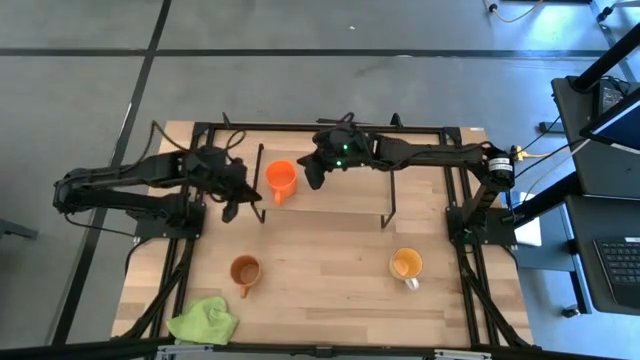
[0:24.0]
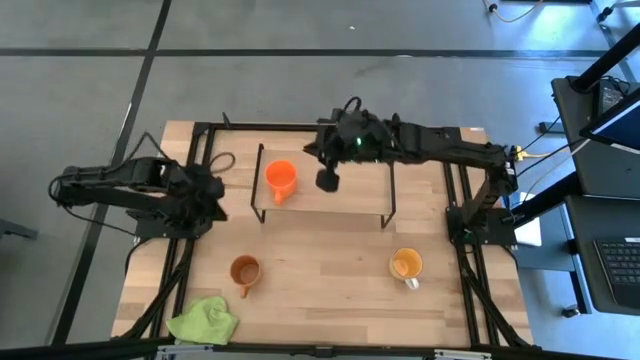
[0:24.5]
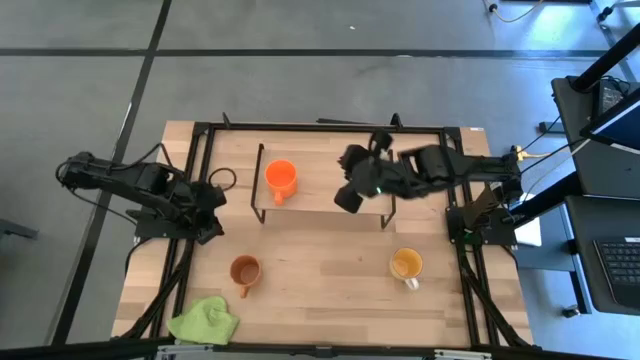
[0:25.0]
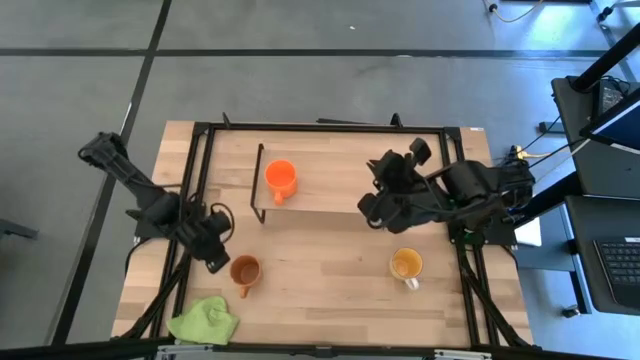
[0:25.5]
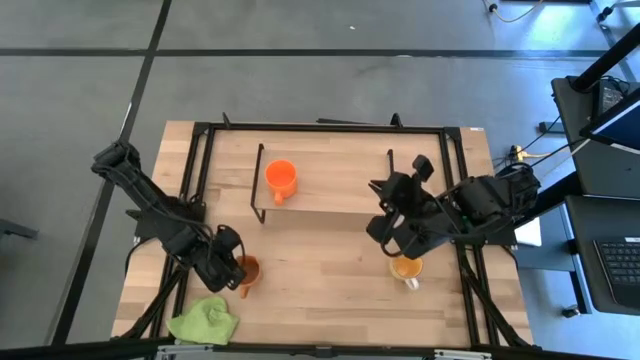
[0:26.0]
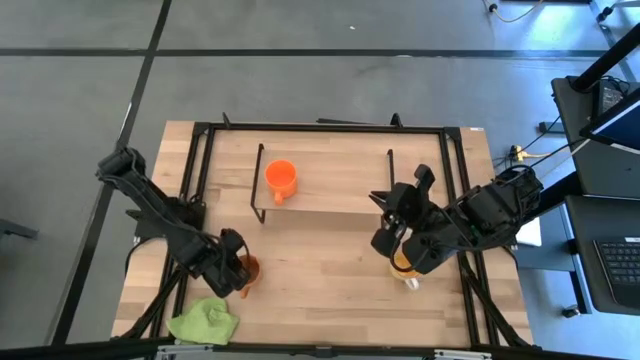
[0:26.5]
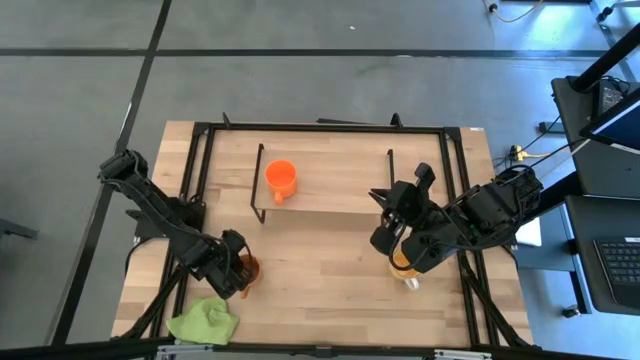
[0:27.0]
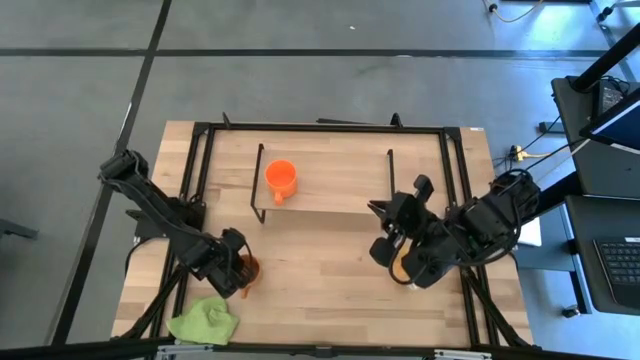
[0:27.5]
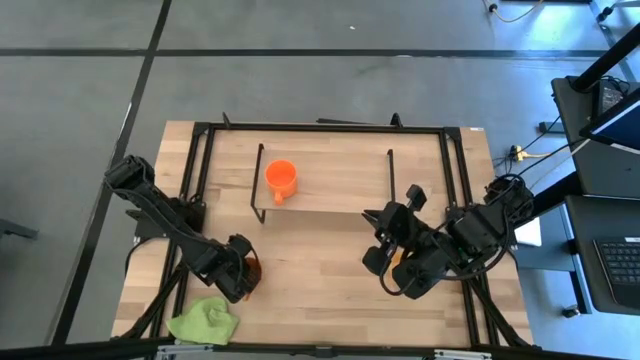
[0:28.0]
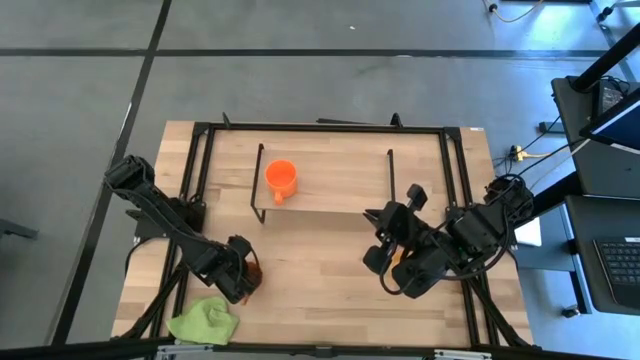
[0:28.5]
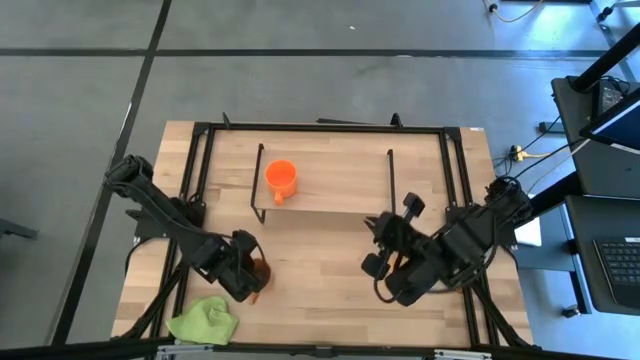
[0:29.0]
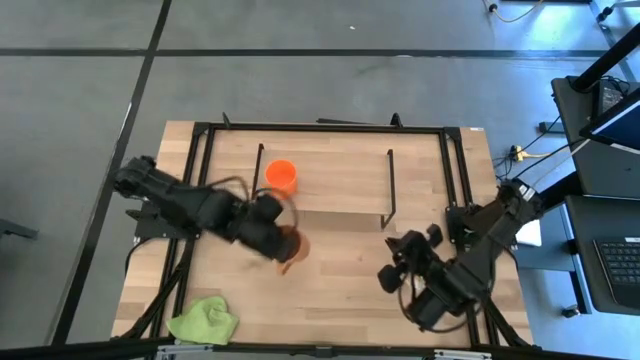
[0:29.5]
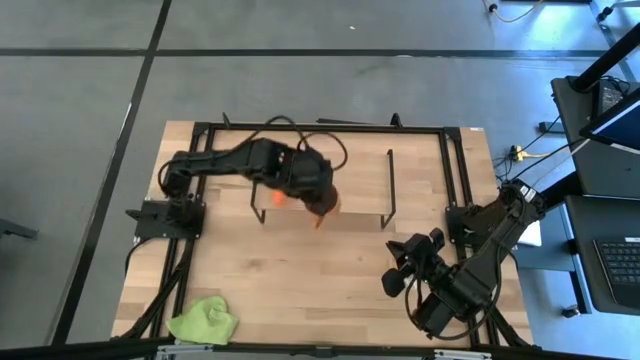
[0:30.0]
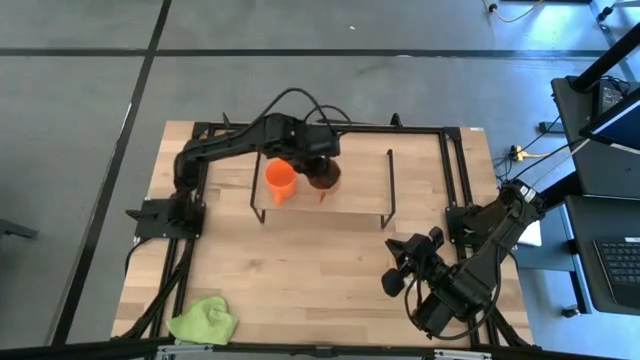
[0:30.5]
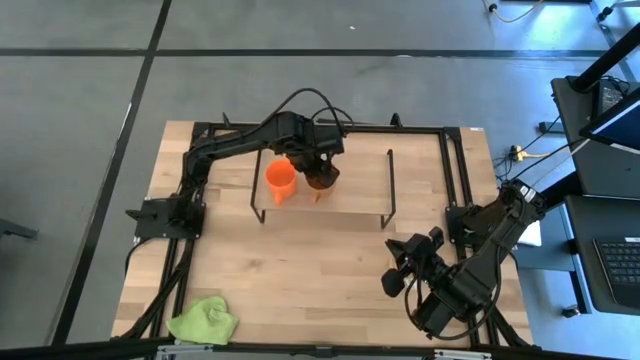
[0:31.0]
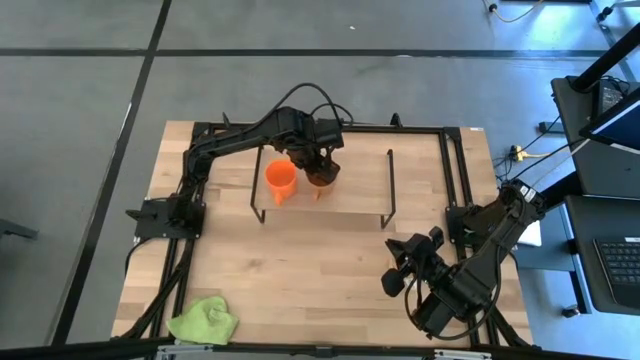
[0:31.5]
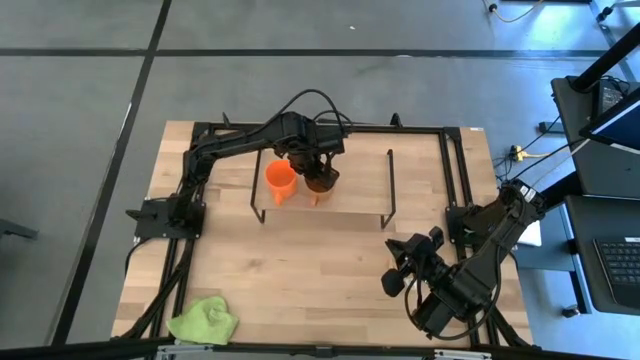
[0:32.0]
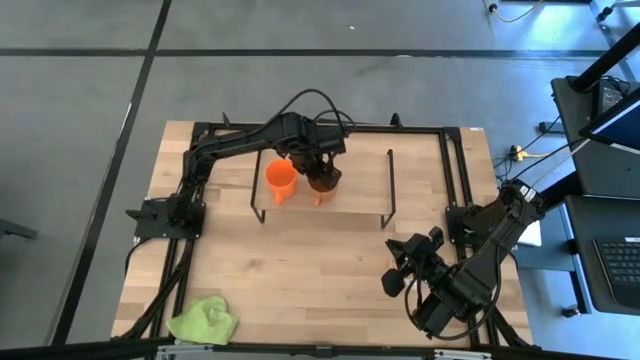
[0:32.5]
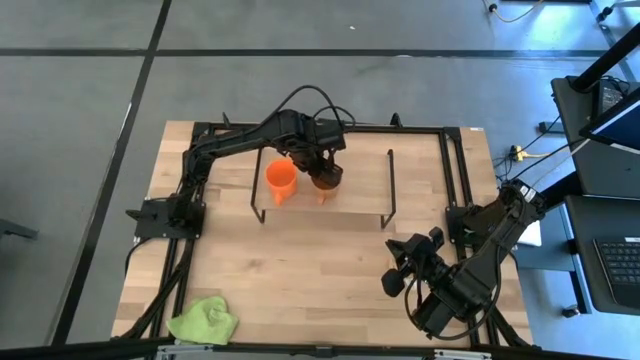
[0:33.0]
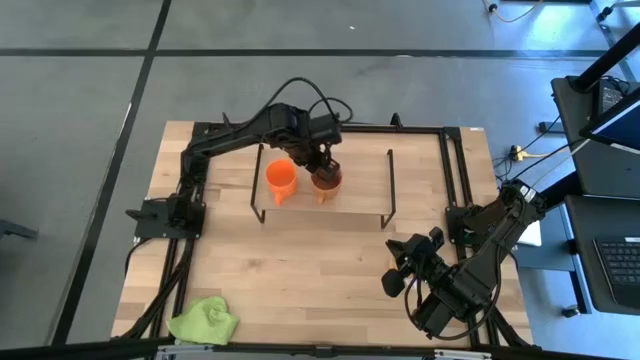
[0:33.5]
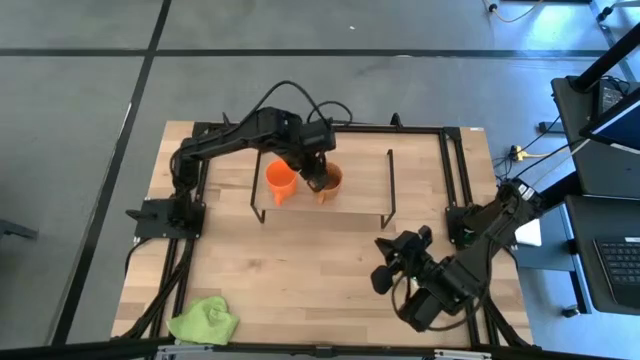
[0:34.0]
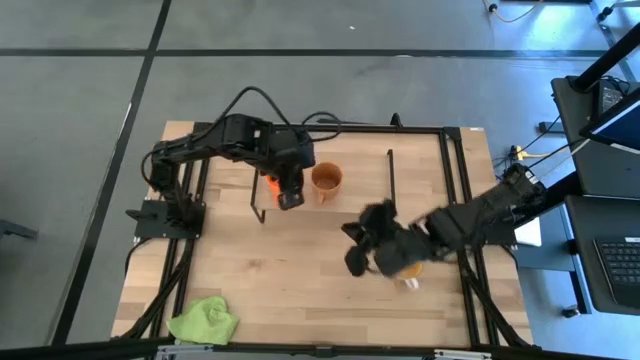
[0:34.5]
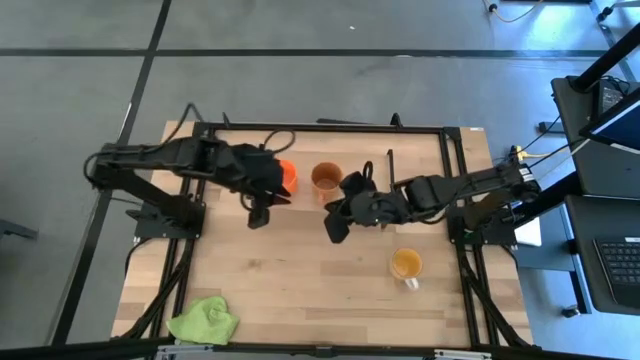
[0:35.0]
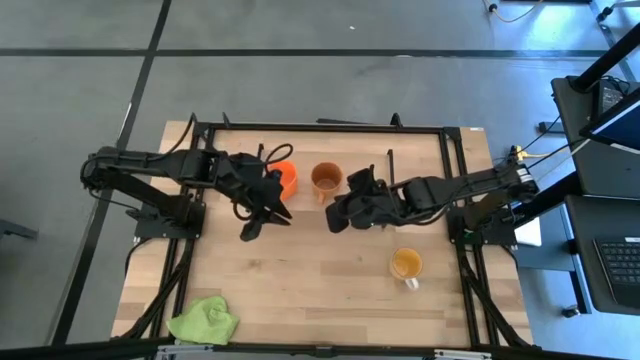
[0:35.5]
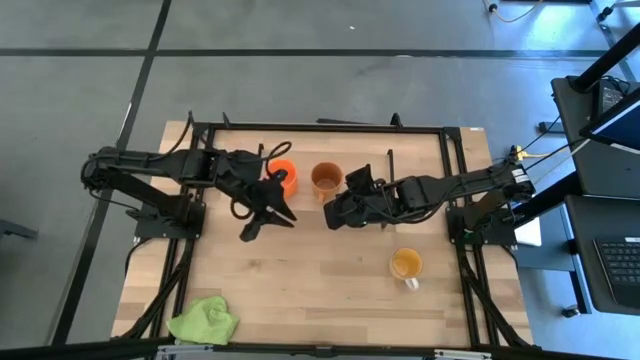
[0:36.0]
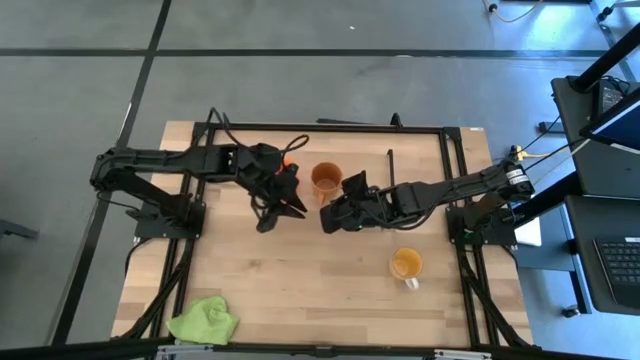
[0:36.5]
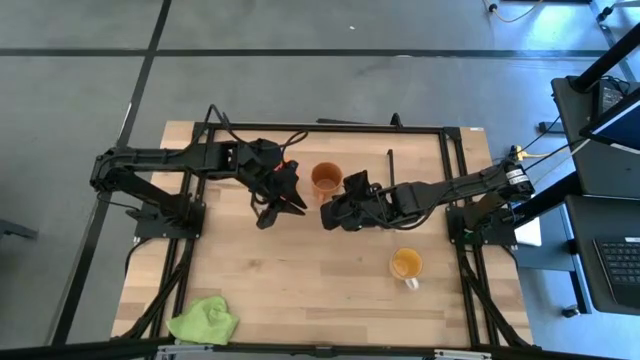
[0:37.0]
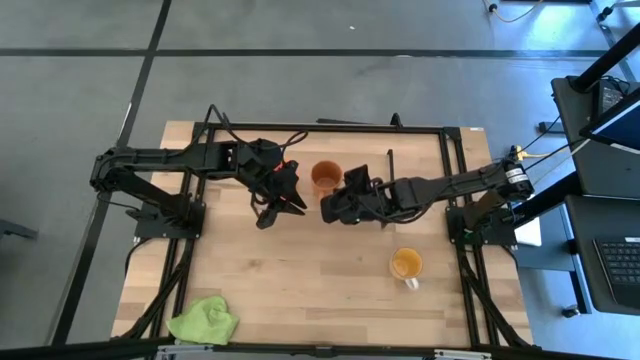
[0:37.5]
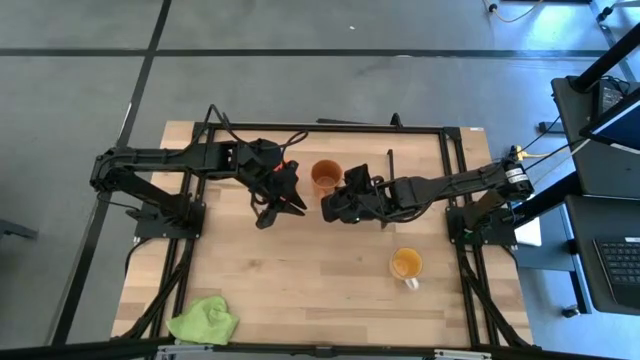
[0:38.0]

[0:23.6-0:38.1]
Task: Stack small to large cups/mugs on shelf
Put the brown cup on the shelf

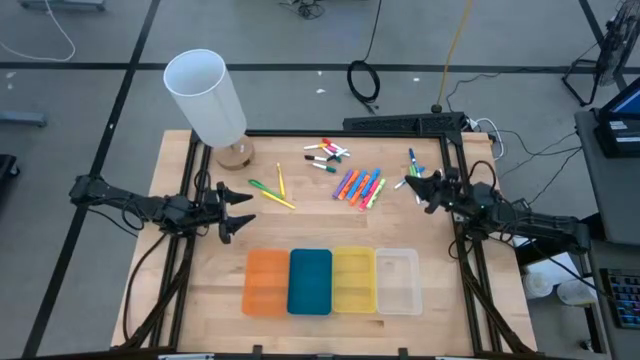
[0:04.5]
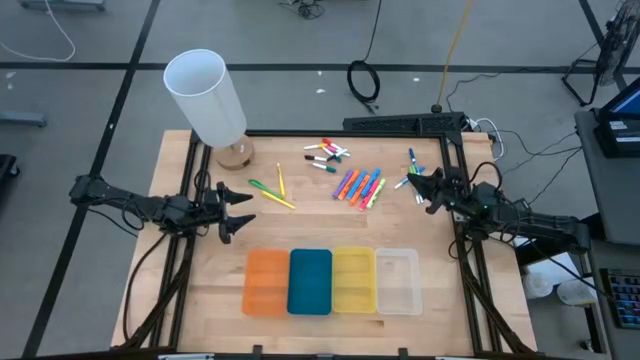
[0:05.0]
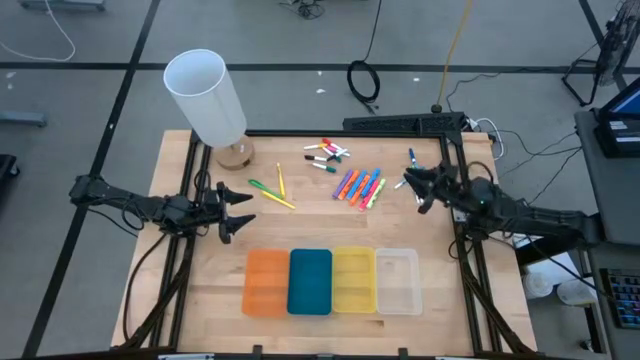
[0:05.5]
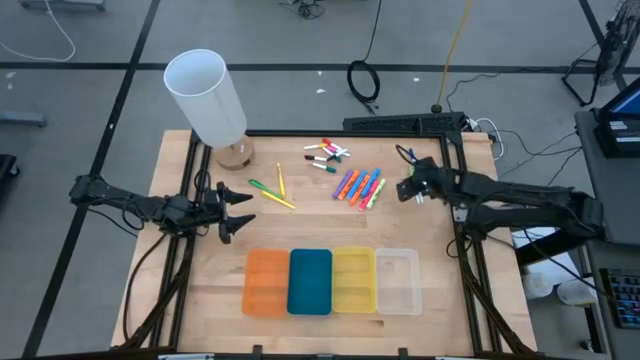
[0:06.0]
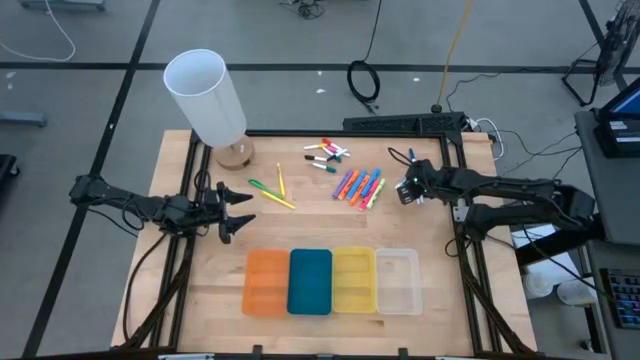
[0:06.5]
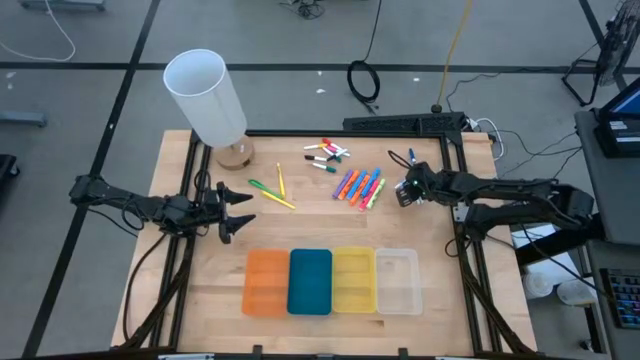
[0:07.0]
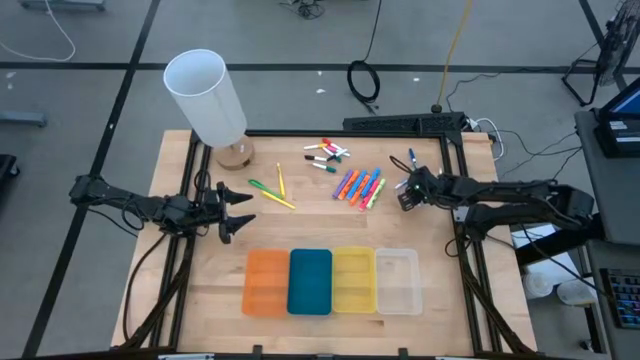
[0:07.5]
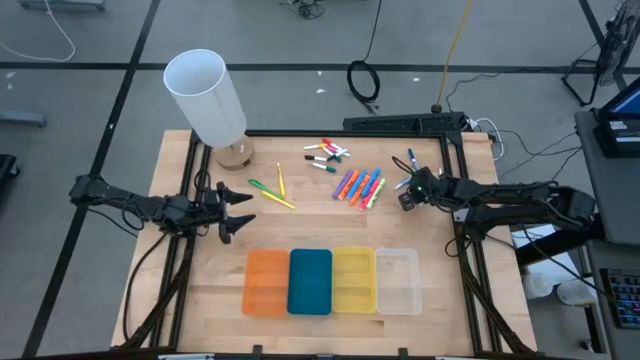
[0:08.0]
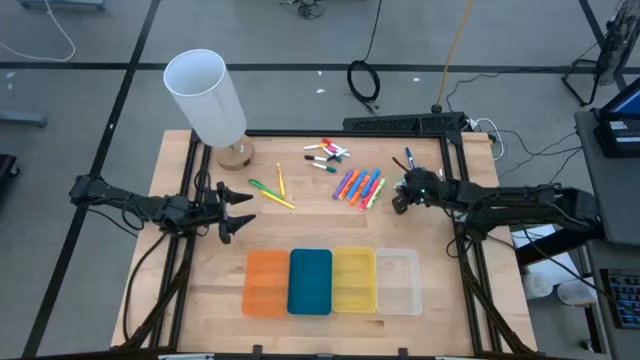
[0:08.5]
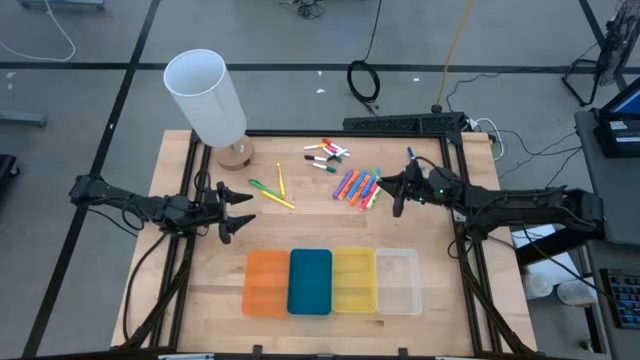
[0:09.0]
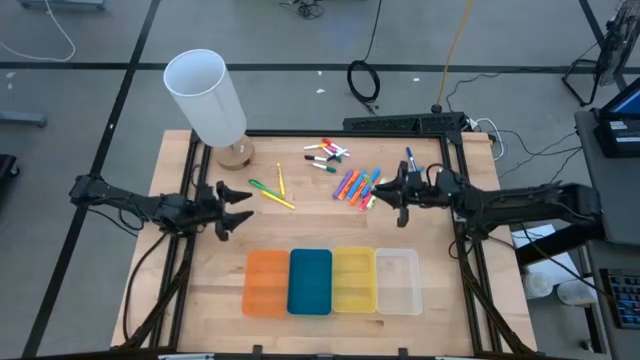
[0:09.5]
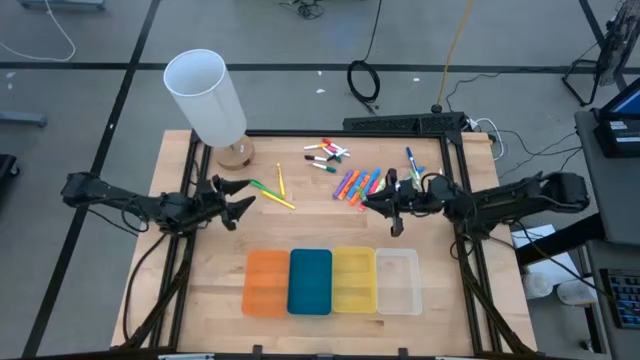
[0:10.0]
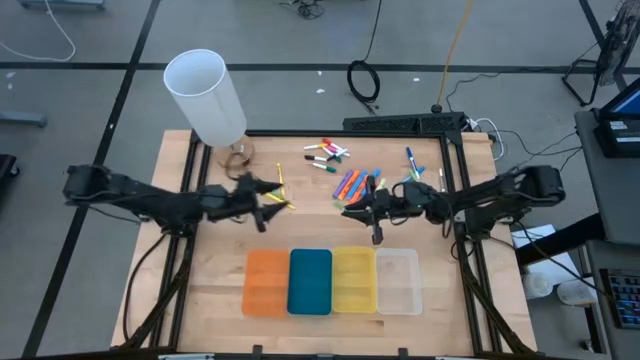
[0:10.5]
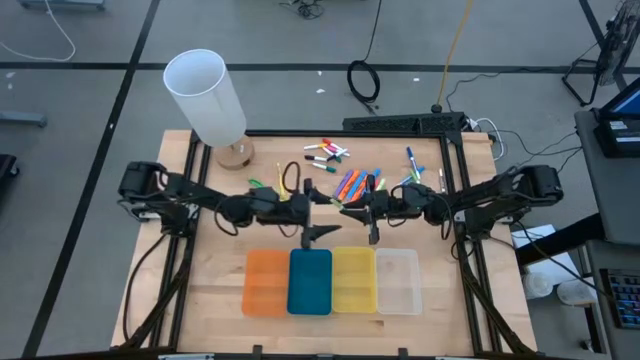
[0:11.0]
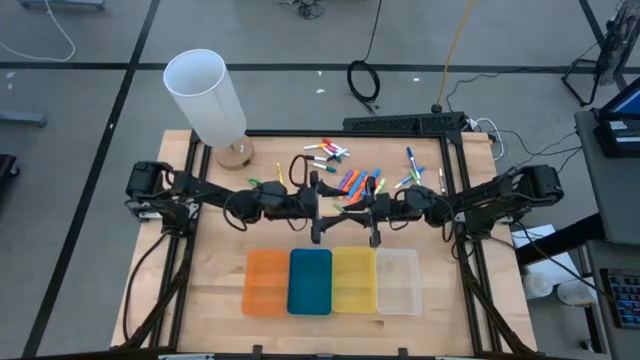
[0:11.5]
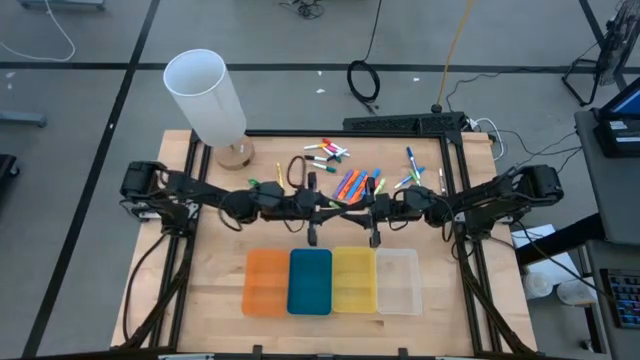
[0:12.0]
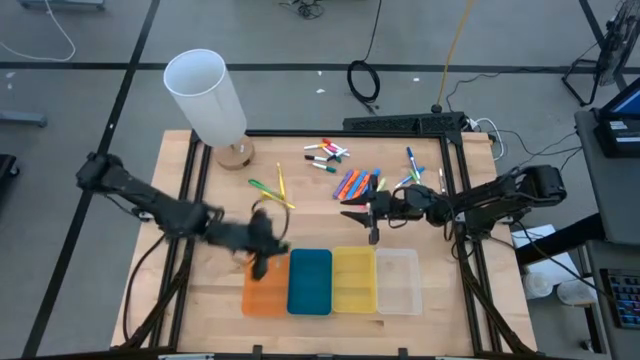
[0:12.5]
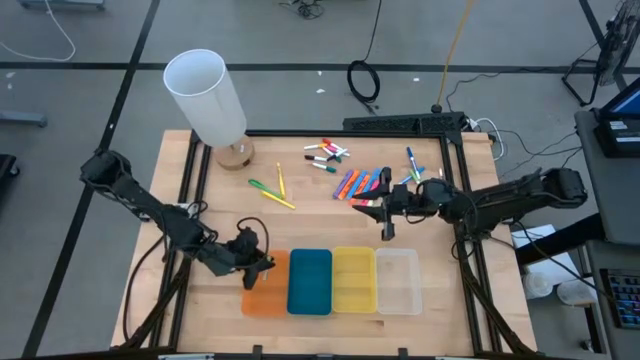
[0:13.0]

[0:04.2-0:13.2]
Task: Pick & Place Markers
Put the left green marker pen into the orange bin
